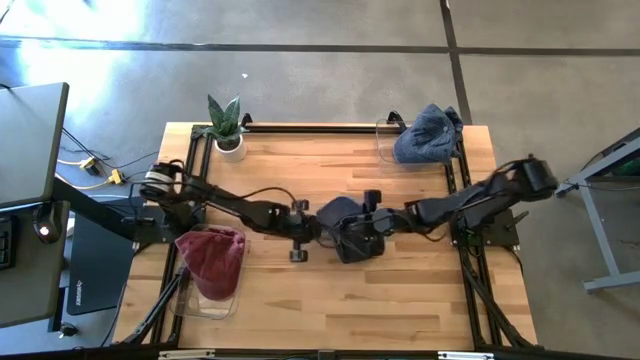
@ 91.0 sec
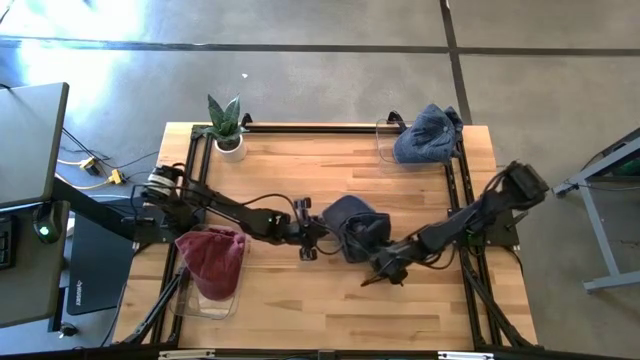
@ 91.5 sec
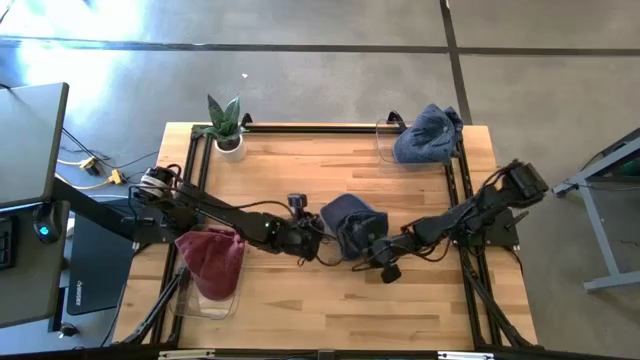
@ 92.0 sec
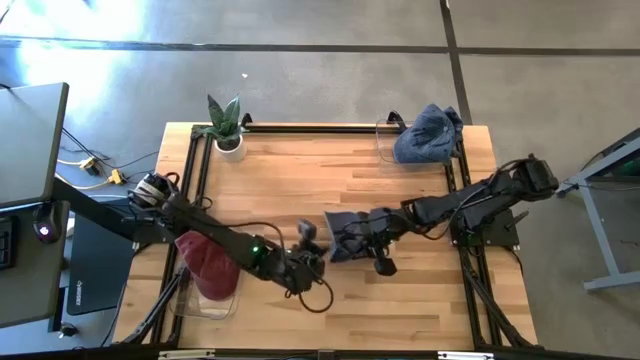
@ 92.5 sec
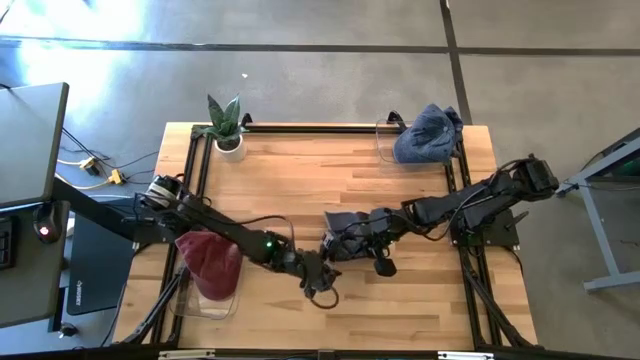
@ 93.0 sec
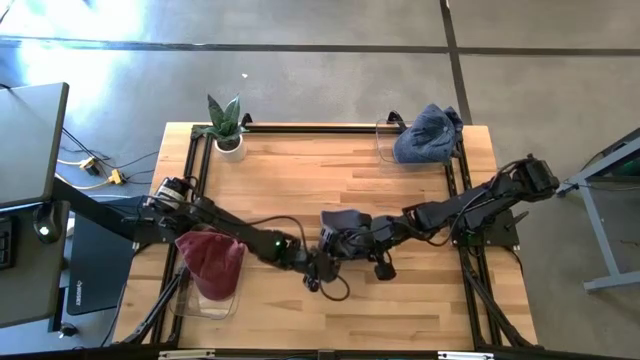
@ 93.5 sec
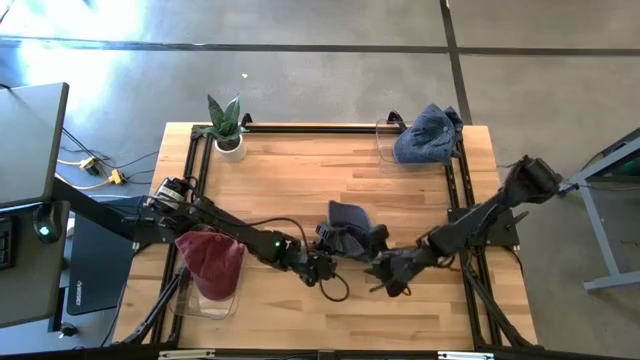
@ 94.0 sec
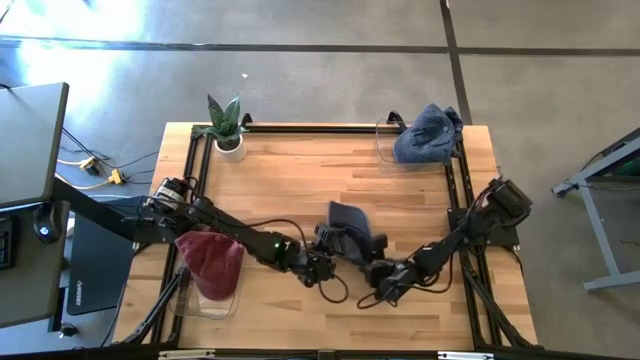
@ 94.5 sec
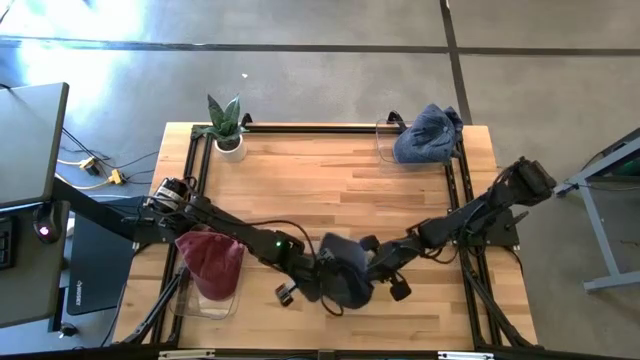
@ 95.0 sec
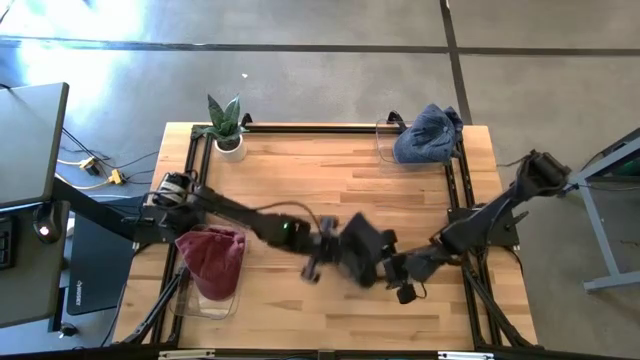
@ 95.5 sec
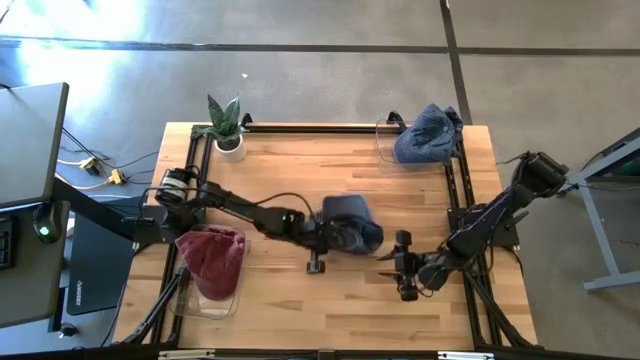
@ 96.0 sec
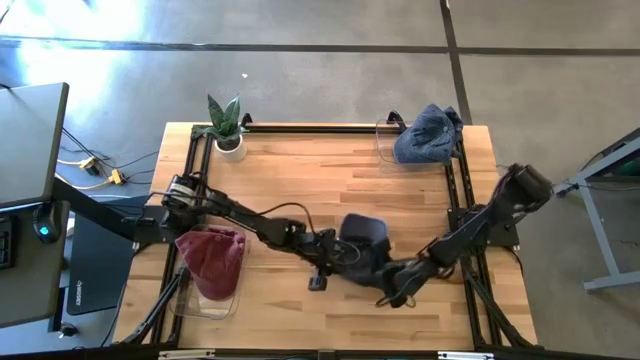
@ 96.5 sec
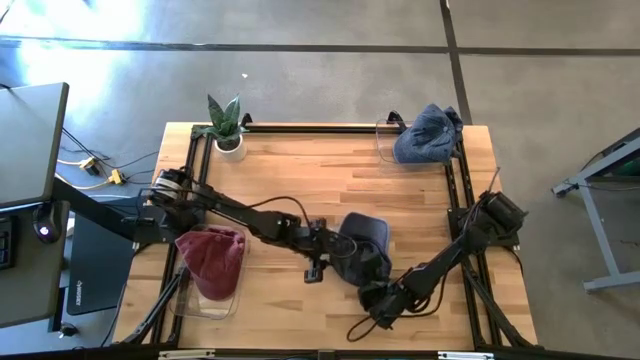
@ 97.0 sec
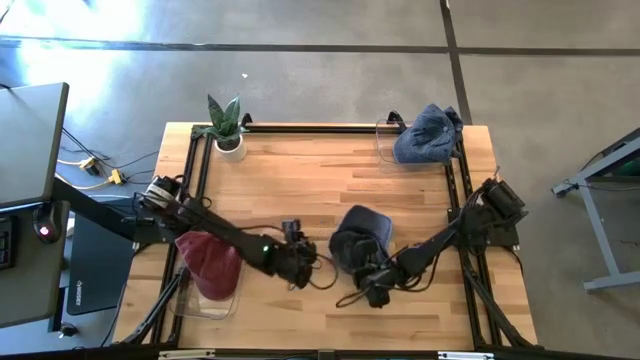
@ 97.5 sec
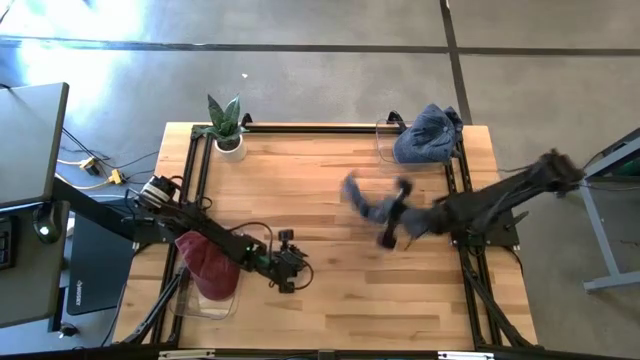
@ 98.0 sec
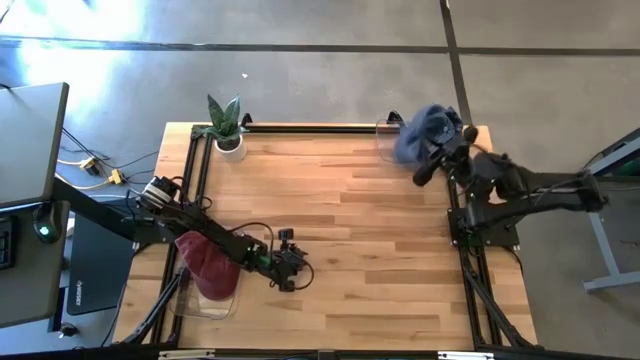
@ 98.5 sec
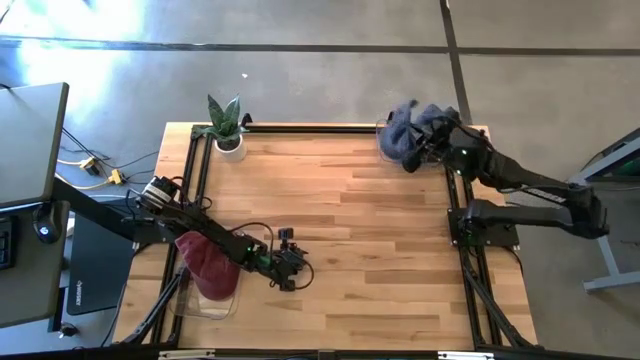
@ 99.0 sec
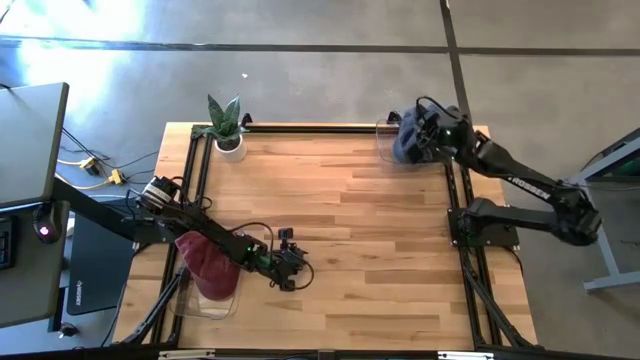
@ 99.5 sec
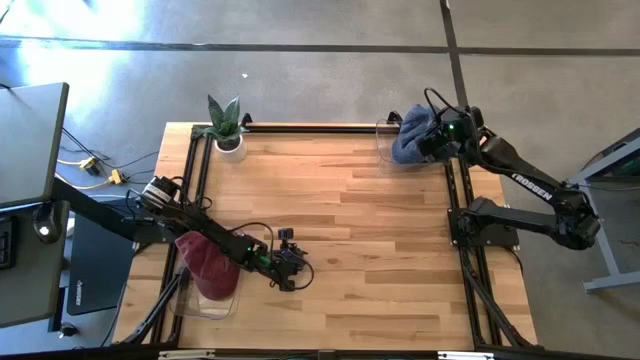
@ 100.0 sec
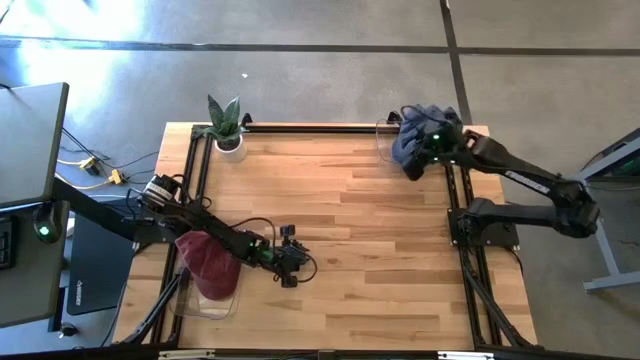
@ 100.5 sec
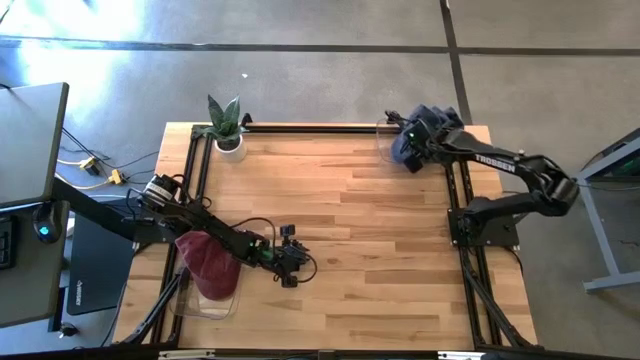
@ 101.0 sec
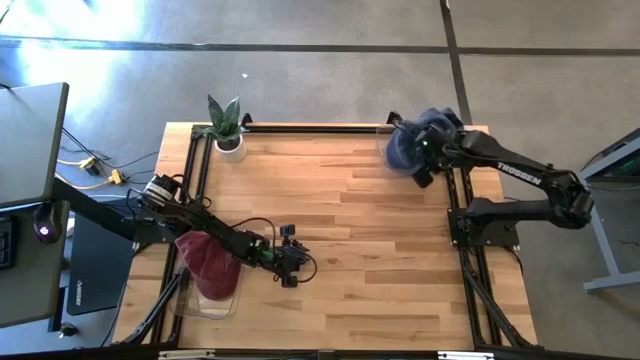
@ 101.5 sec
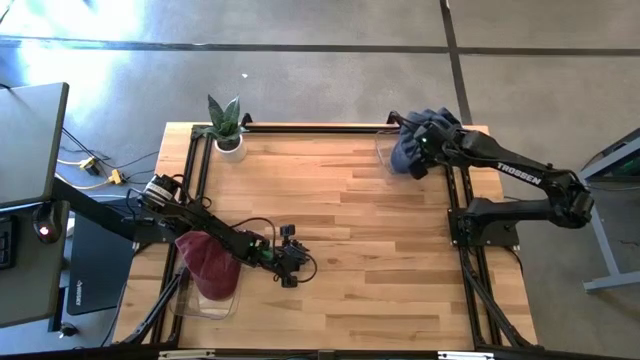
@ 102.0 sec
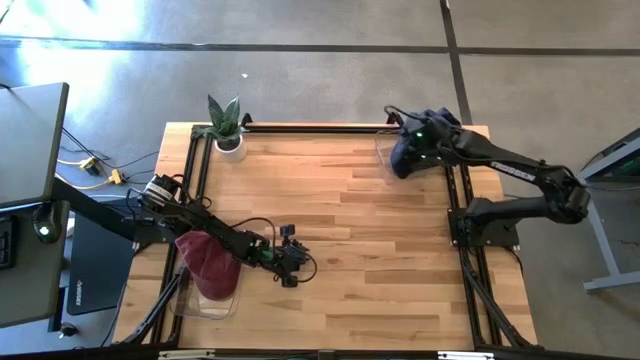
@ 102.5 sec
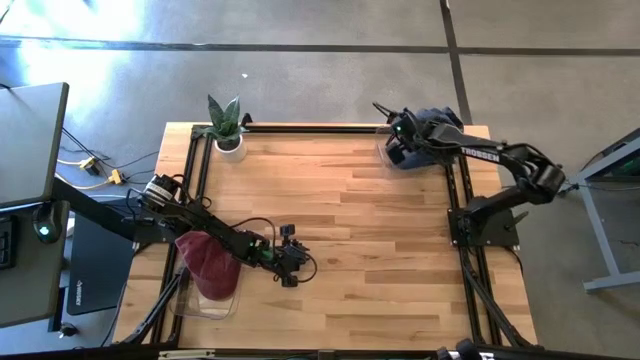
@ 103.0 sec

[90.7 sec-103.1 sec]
Task: Pick & Place hat
Put the dark blue cap into the top transparent bin

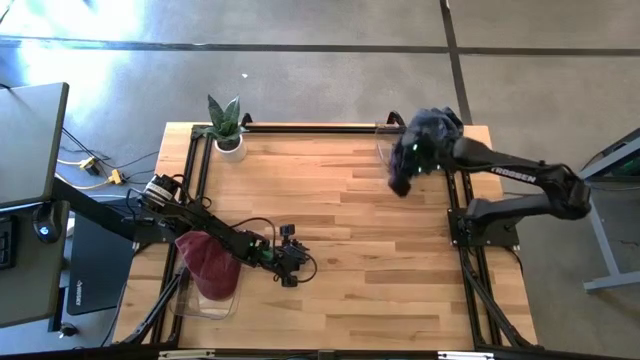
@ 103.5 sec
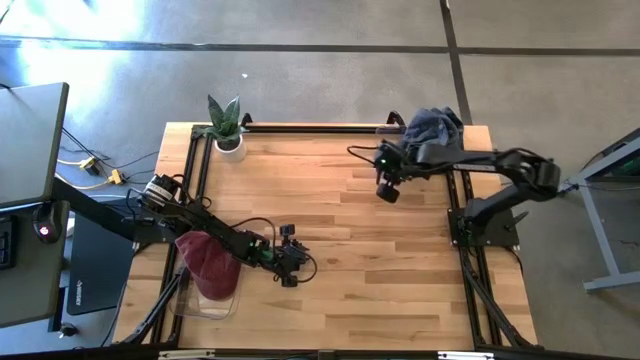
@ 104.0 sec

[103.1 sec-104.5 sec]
Adjust the top transparent bin

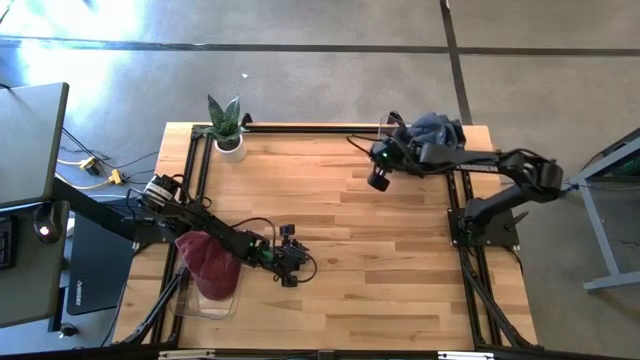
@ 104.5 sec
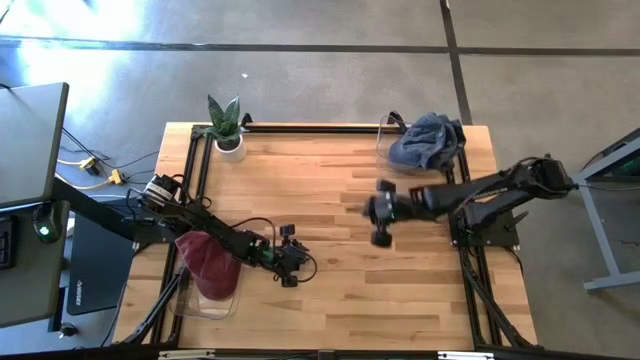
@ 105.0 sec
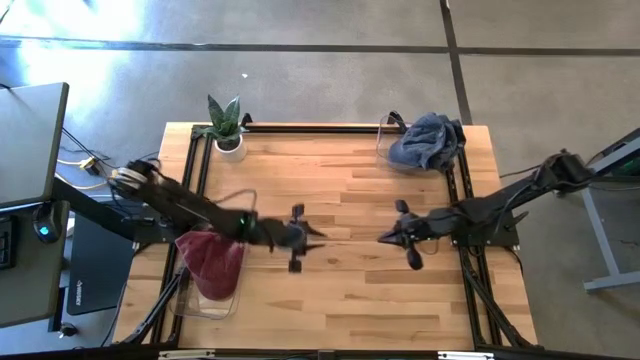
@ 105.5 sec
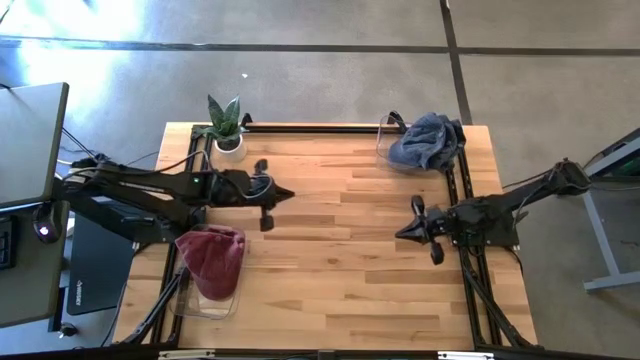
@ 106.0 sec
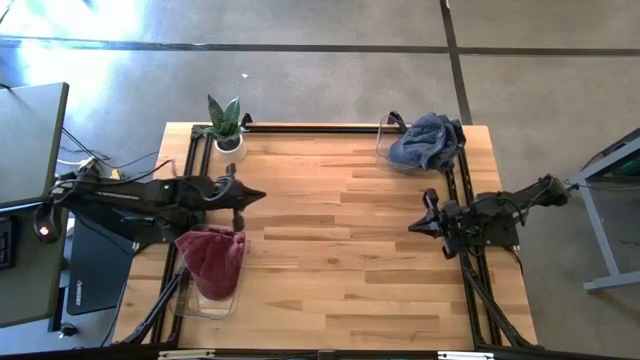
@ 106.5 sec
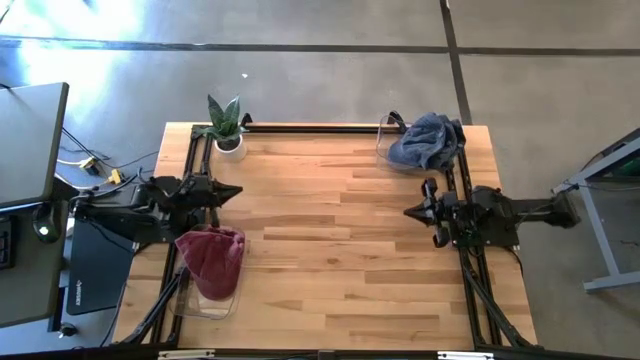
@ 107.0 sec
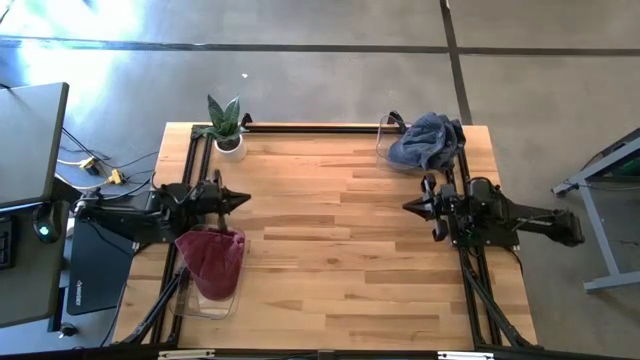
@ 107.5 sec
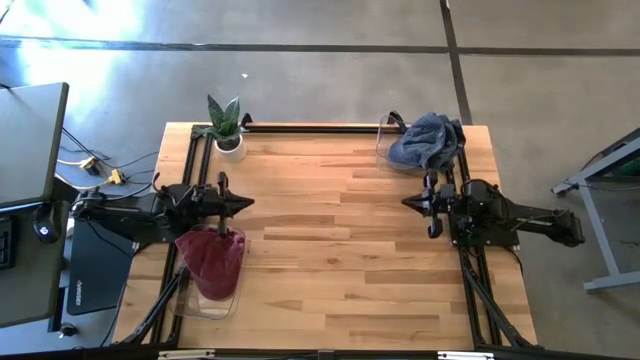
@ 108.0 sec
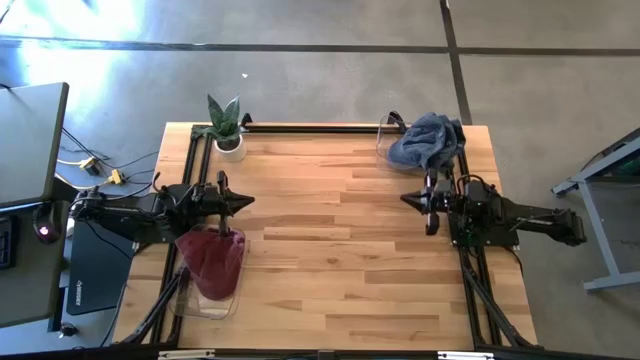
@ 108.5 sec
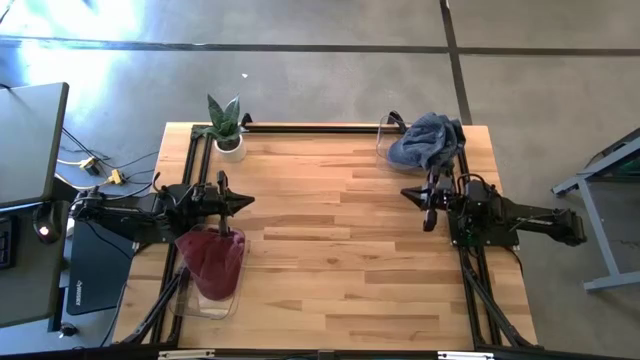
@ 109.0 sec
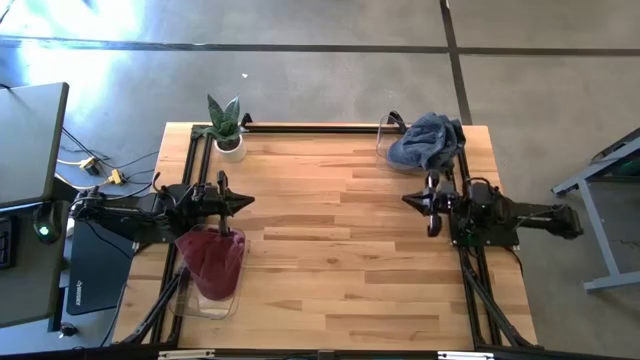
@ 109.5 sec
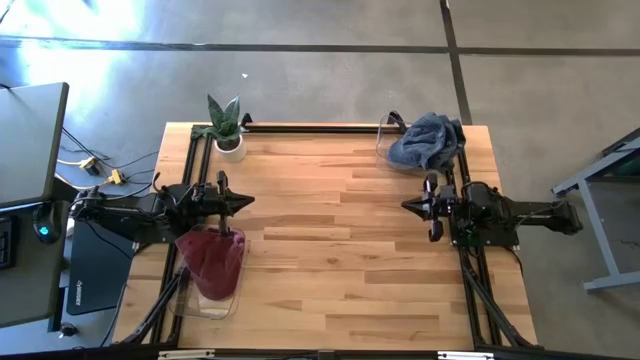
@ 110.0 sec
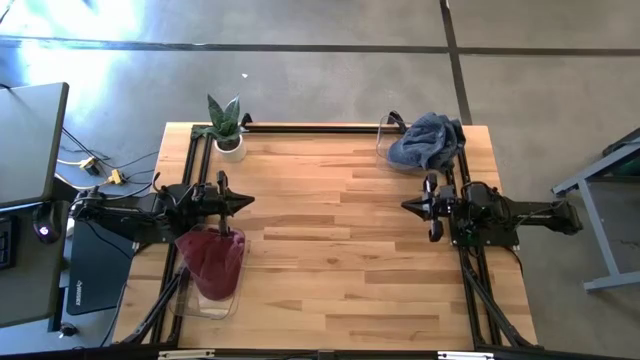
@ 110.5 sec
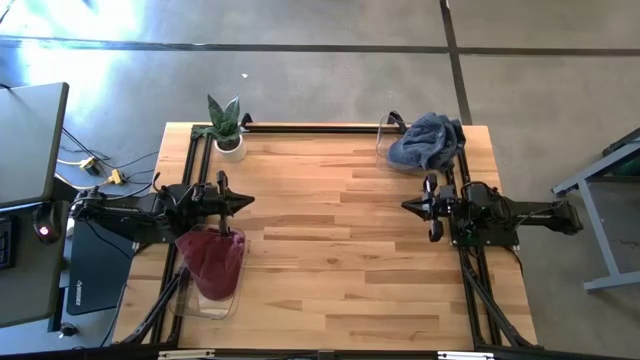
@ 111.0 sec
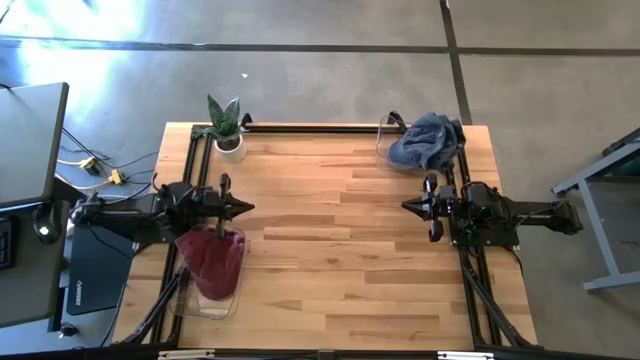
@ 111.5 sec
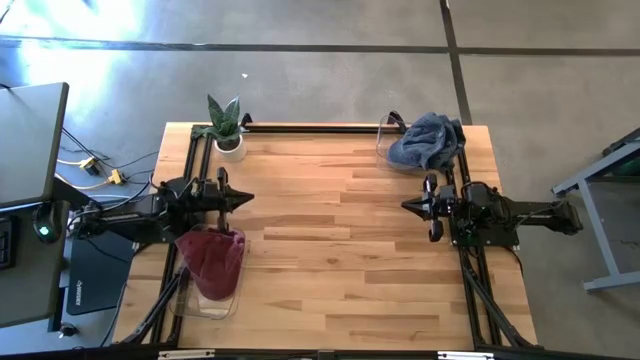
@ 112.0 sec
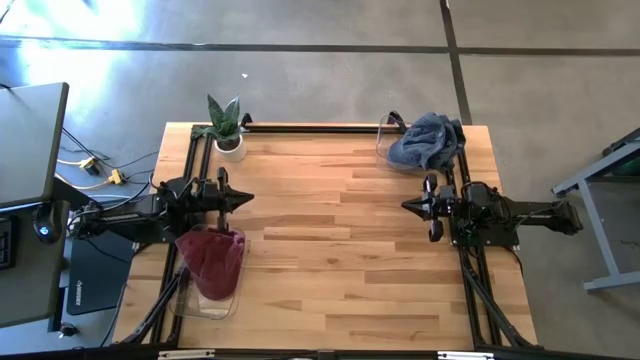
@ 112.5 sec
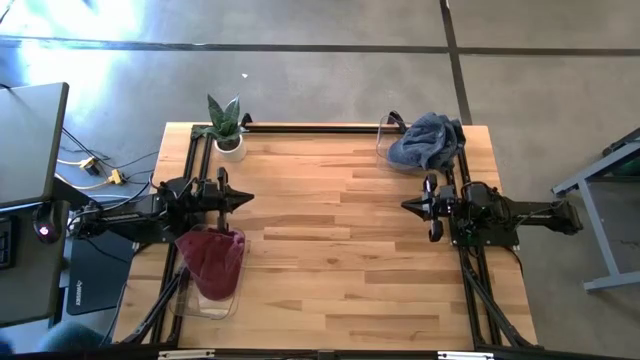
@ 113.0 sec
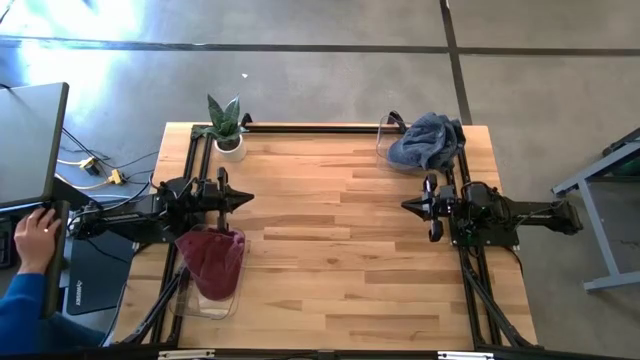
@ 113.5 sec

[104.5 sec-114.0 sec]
Return to Home Position
